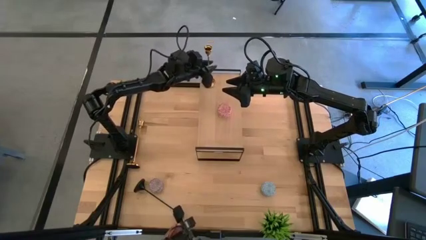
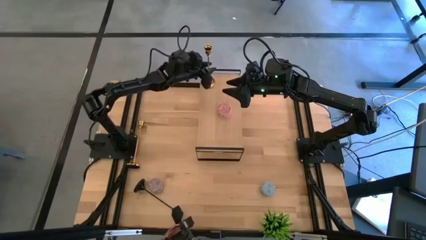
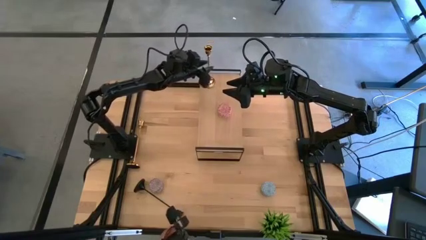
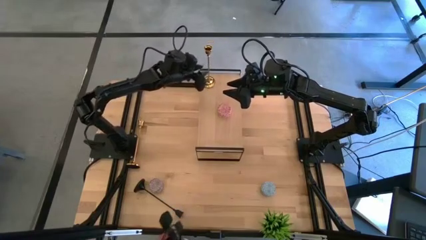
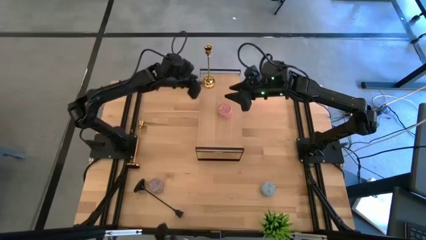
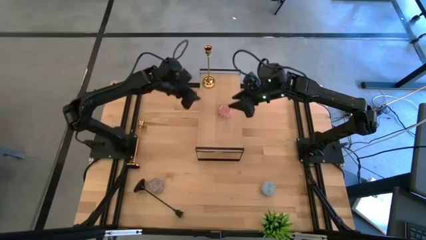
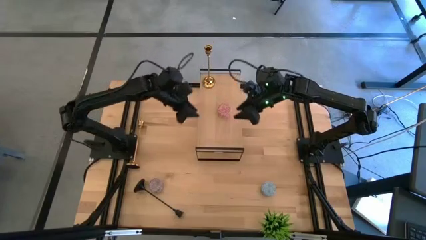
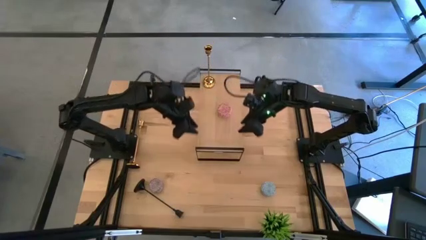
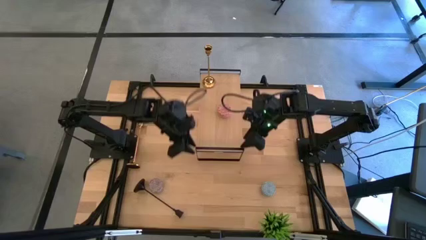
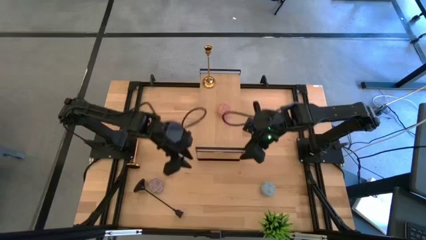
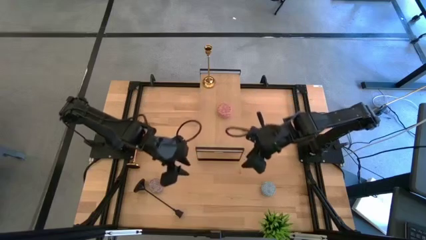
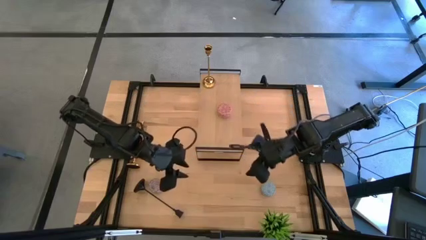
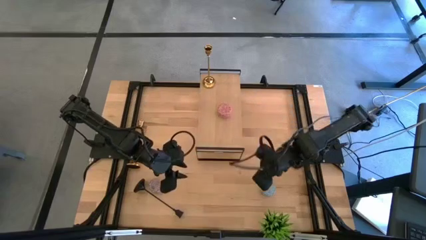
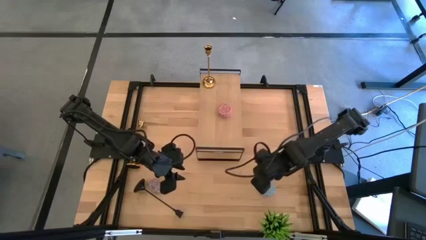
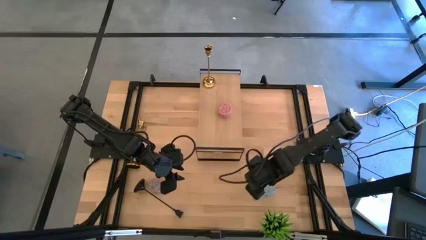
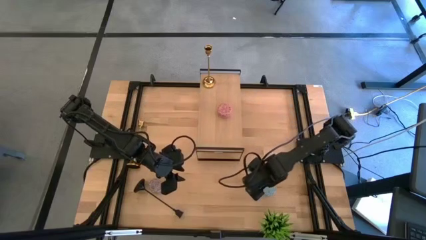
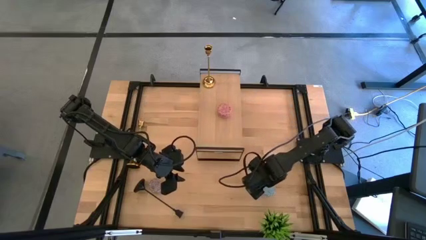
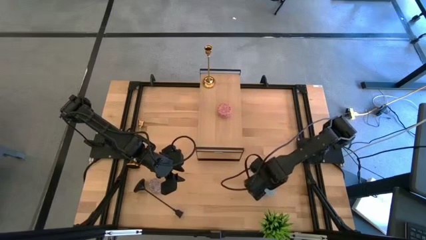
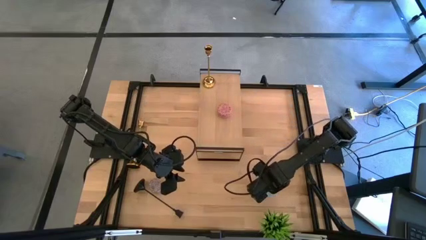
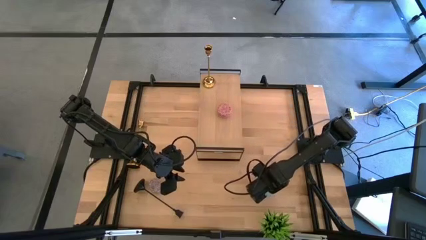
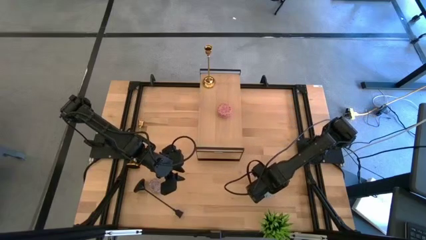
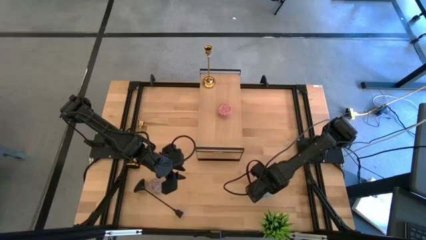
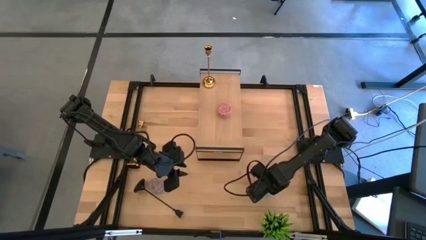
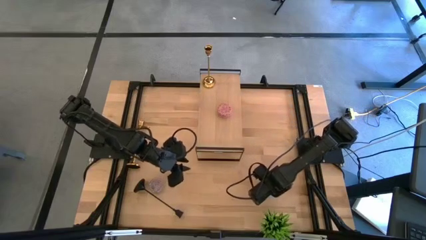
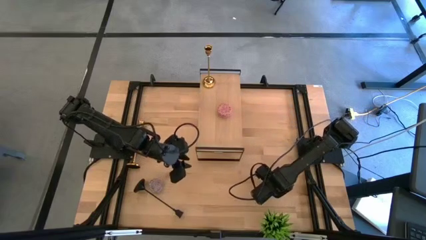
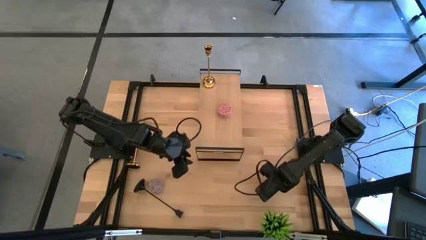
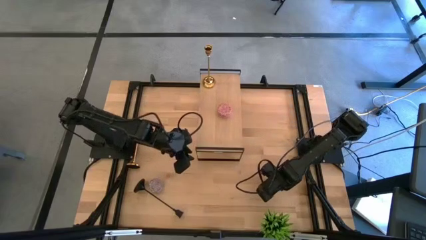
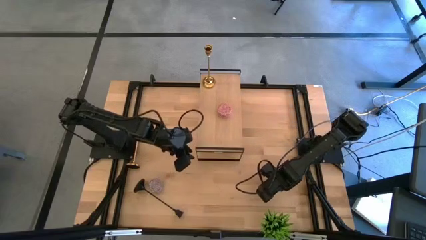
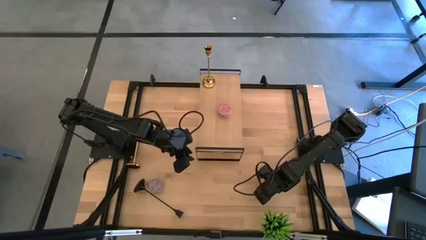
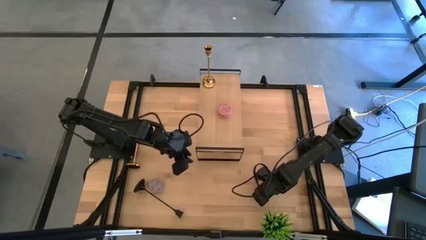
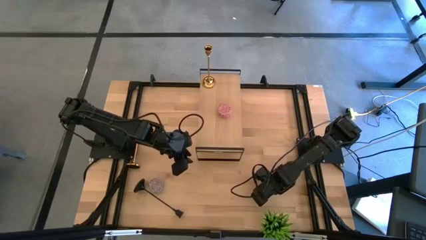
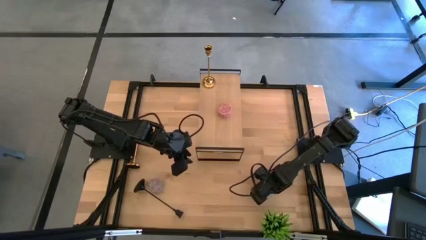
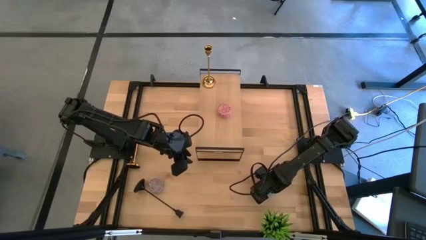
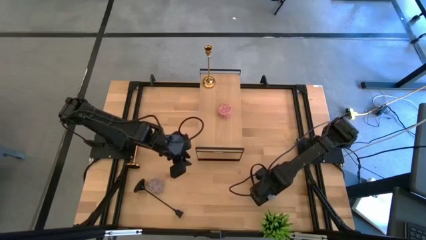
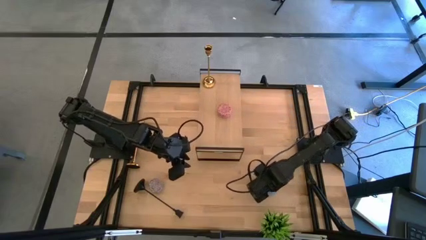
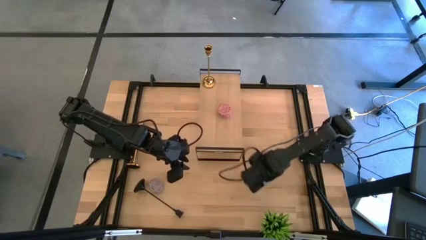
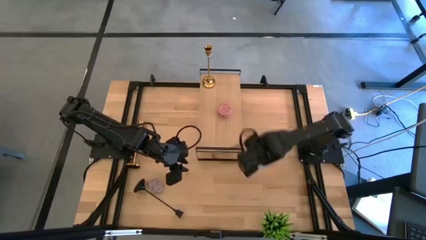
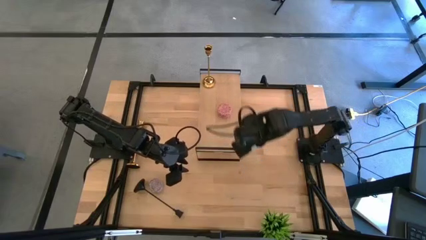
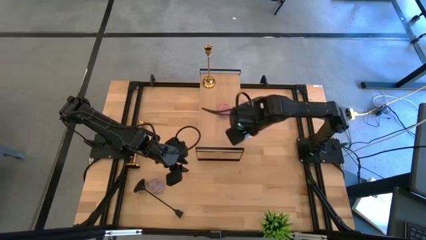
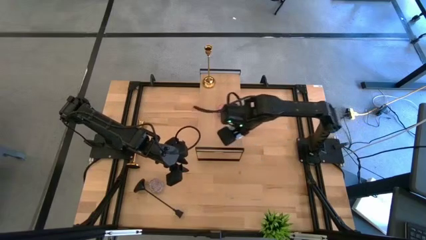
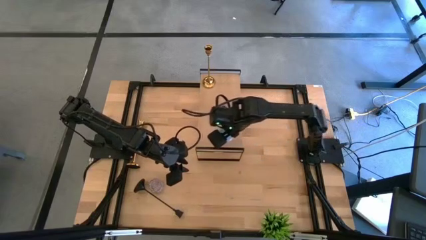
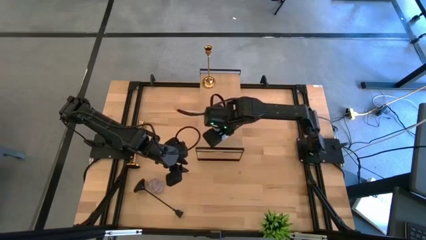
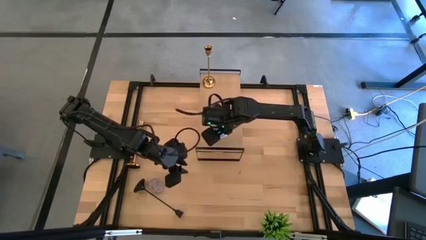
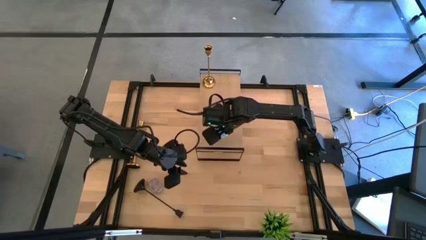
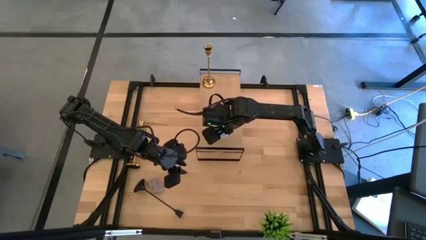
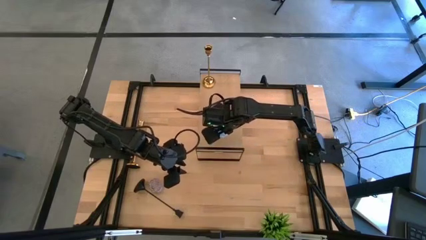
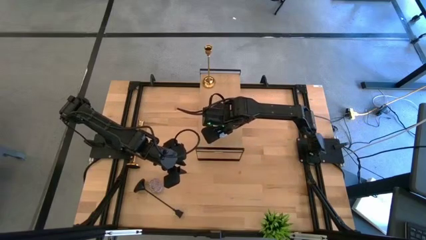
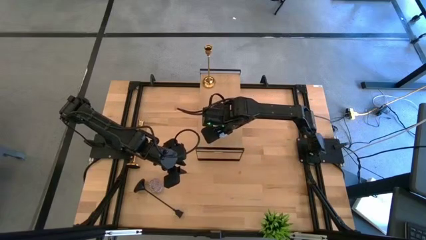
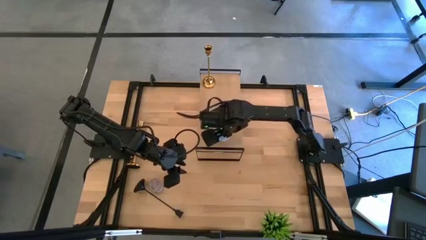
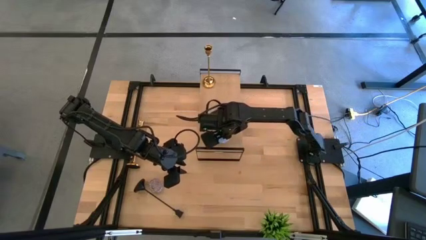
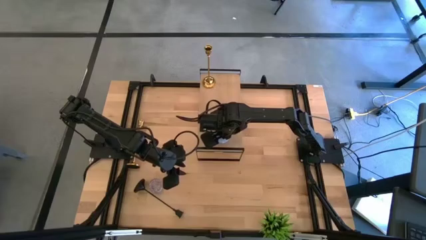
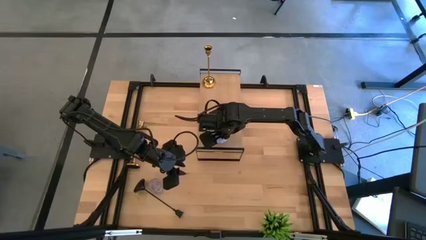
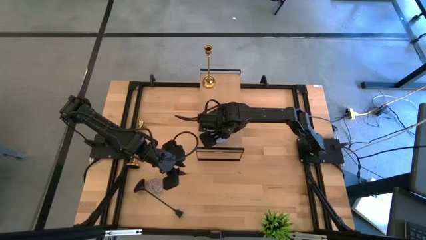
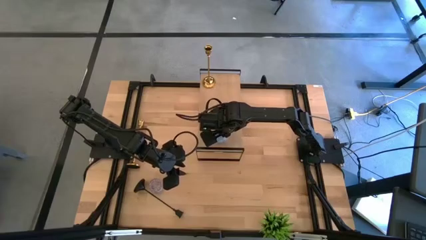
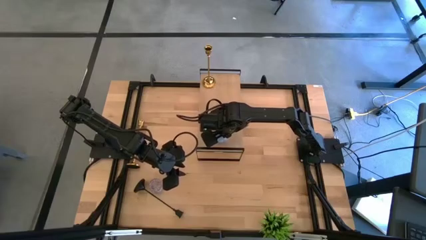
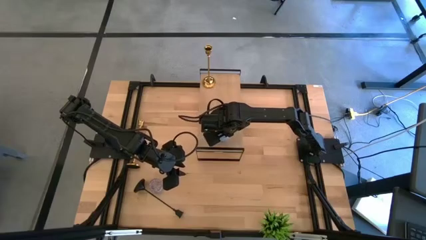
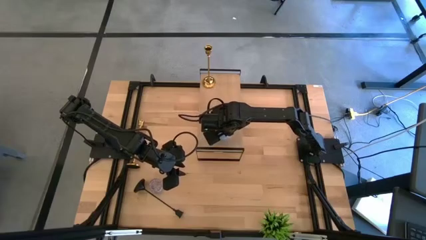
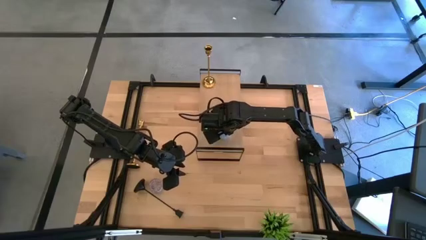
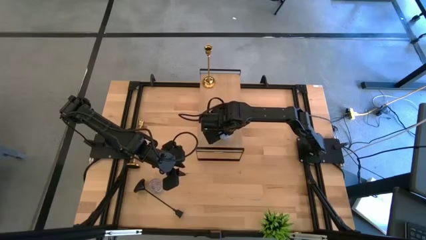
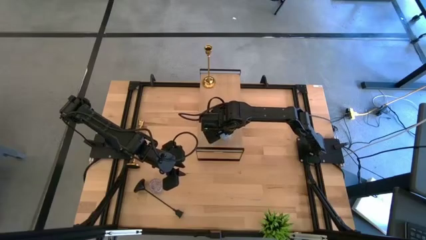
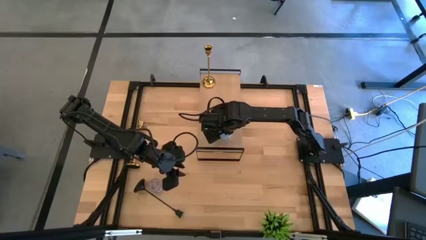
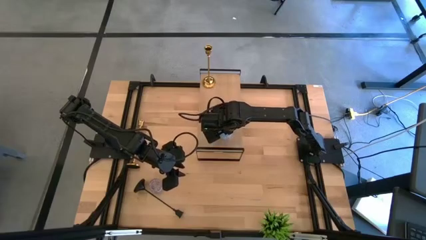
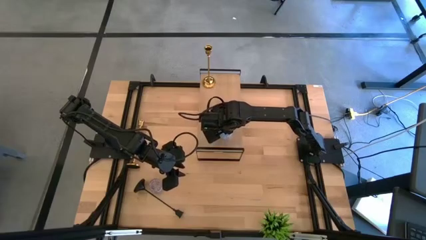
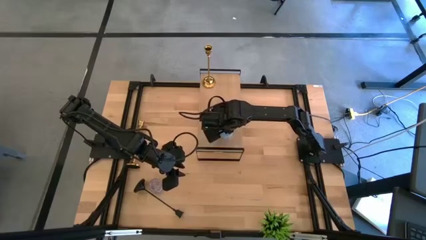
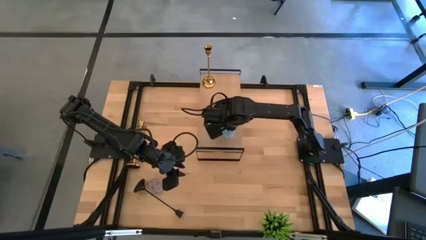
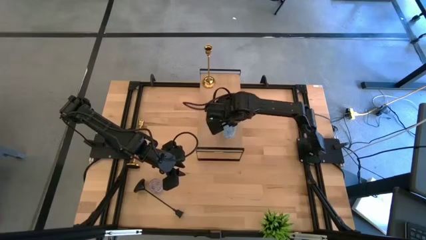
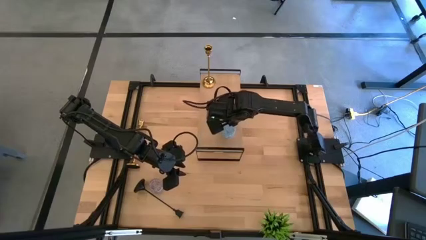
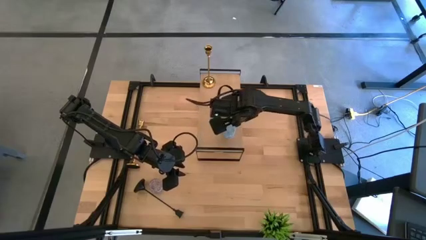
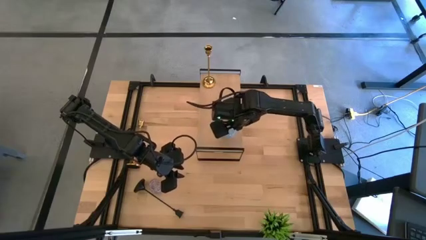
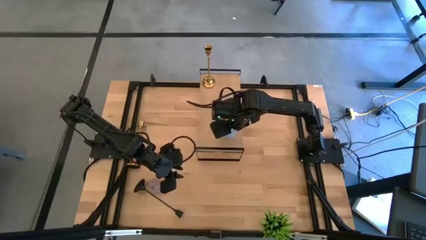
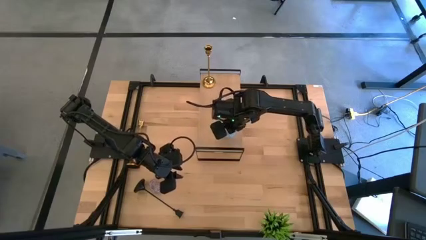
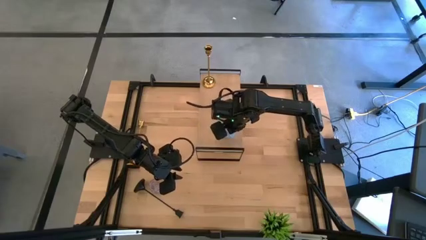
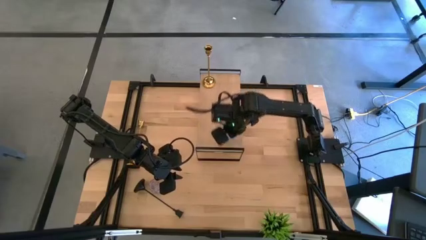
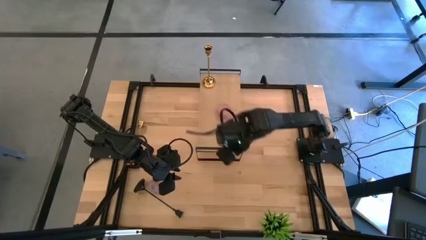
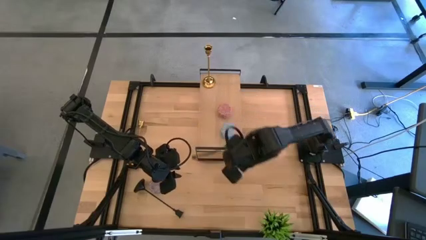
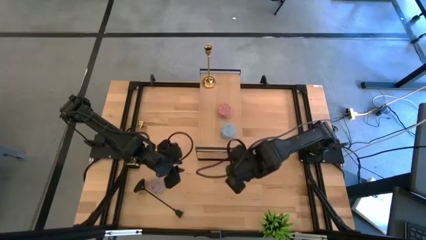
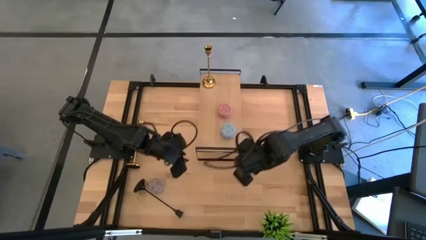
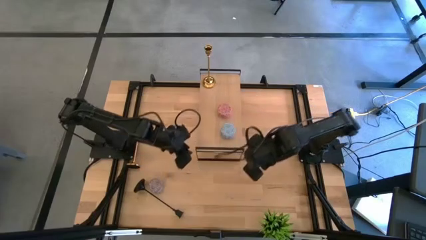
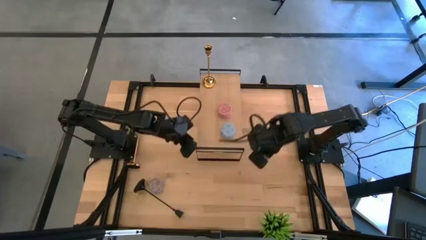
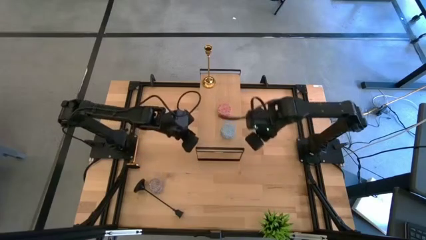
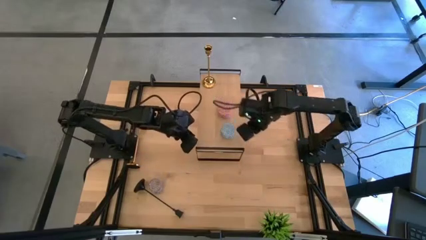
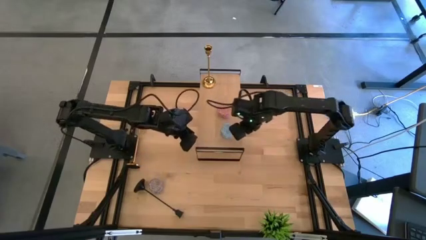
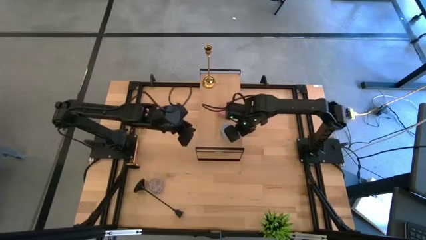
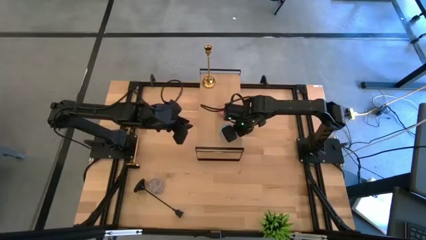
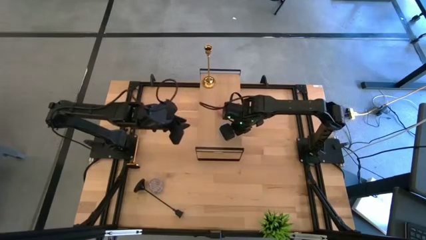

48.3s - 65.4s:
Task: Pick & Place candle stick holders
Put the blue scented candle on the shelf
